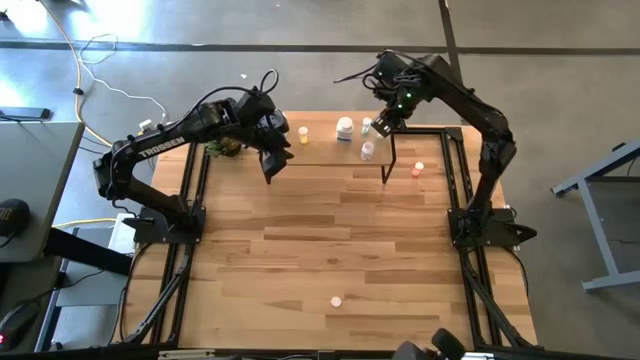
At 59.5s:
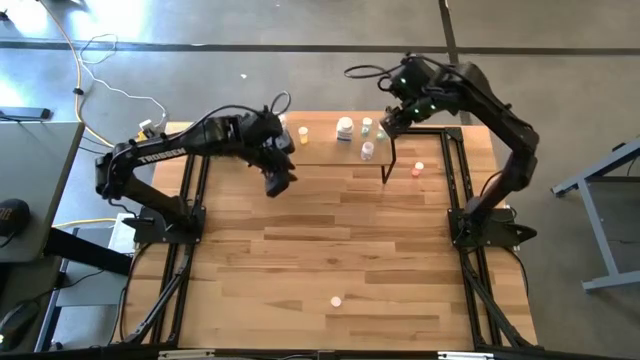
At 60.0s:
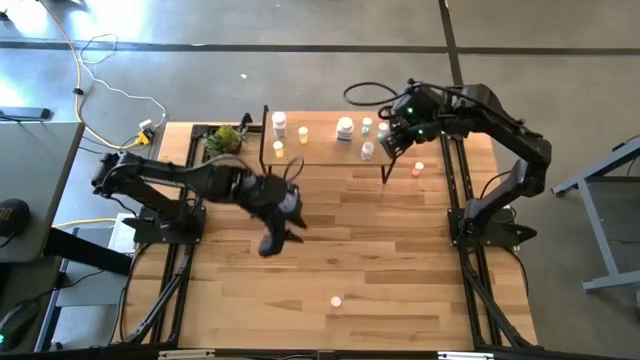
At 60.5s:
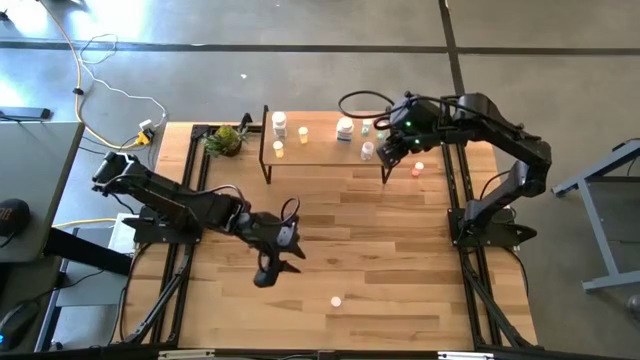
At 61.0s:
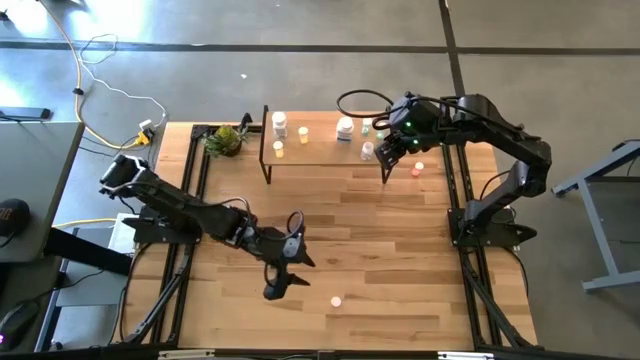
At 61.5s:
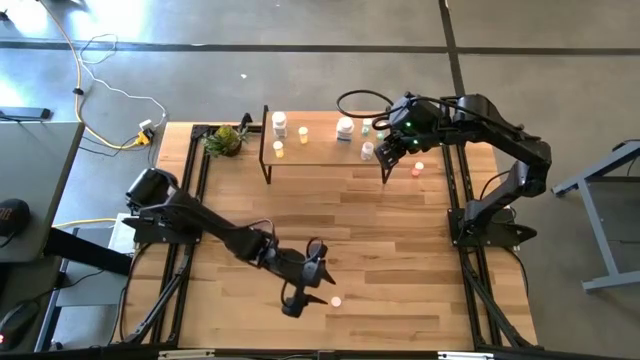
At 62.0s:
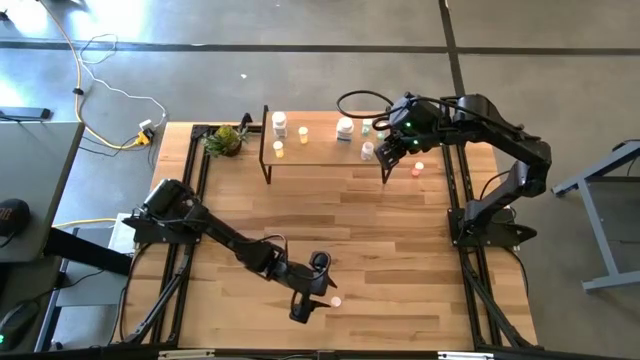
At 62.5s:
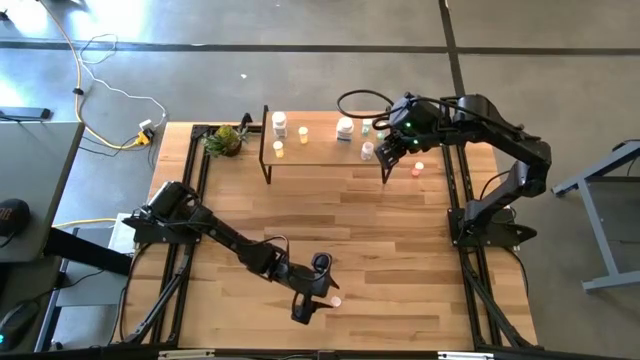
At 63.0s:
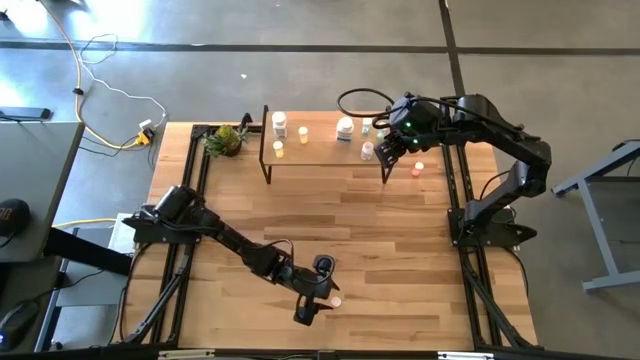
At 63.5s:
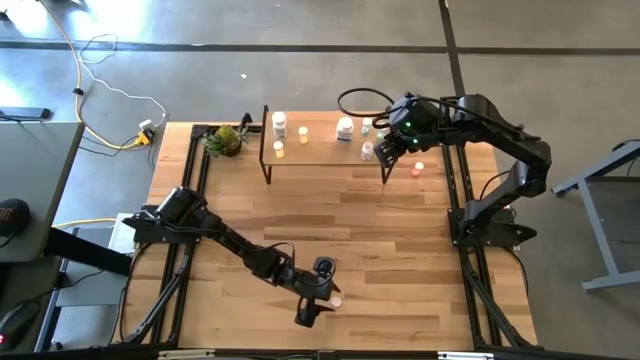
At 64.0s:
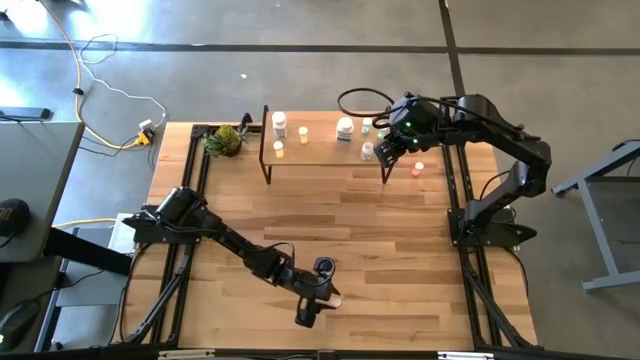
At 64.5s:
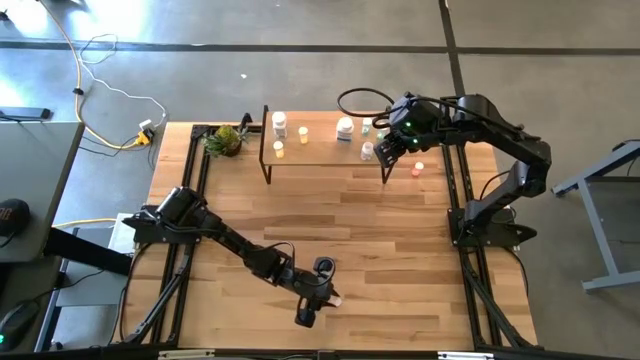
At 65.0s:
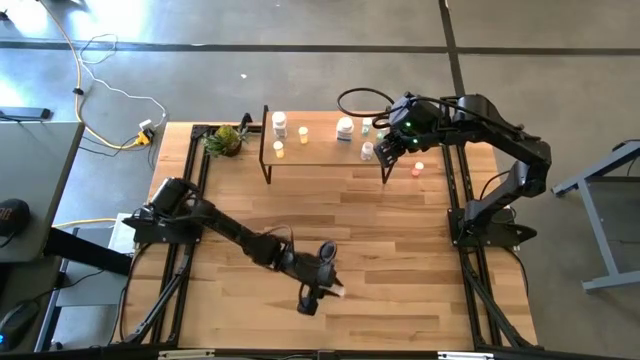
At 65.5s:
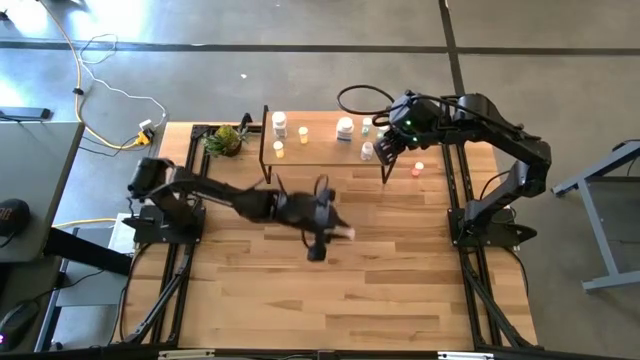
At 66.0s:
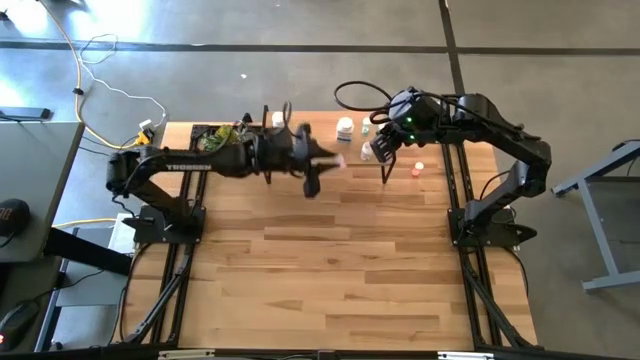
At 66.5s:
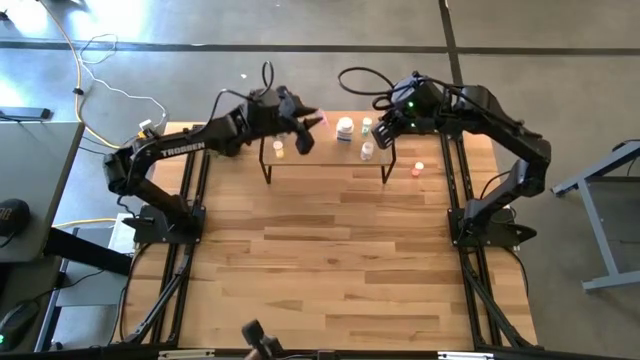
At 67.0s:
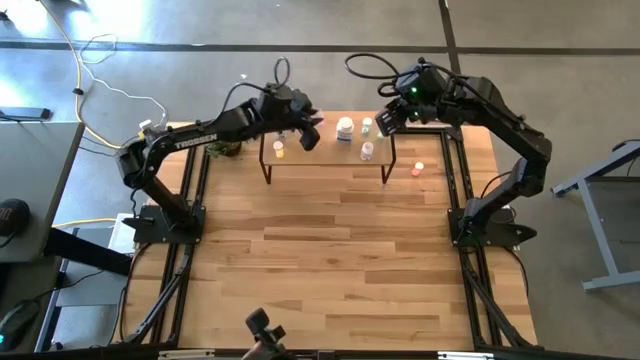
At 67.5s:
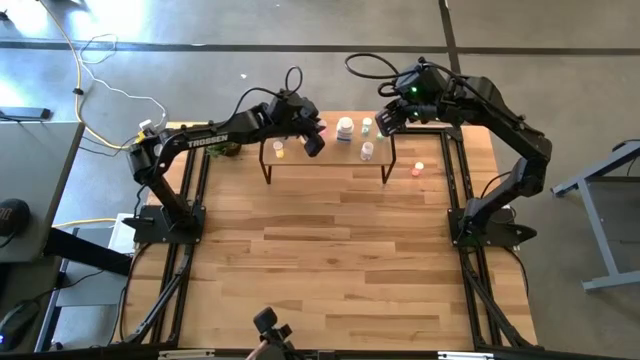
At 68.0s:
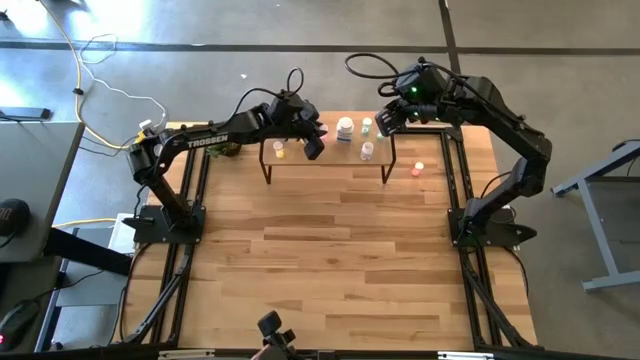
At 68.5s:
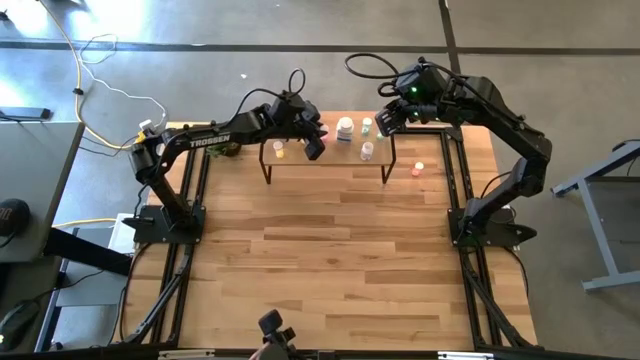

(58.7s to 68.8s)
Task: Pick and place medicine bottles onto shelf by color
Put the bottom pink pill bottle on the shelf

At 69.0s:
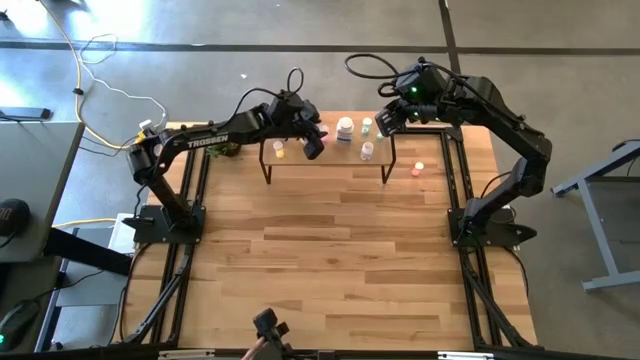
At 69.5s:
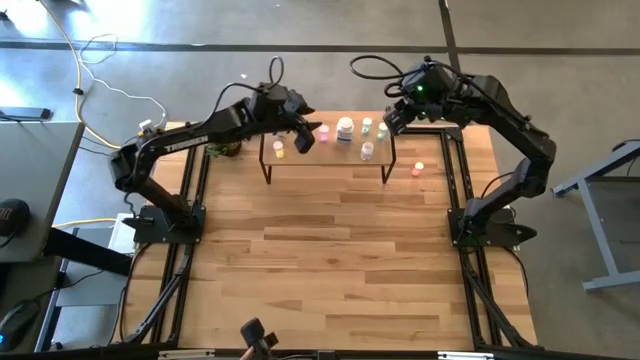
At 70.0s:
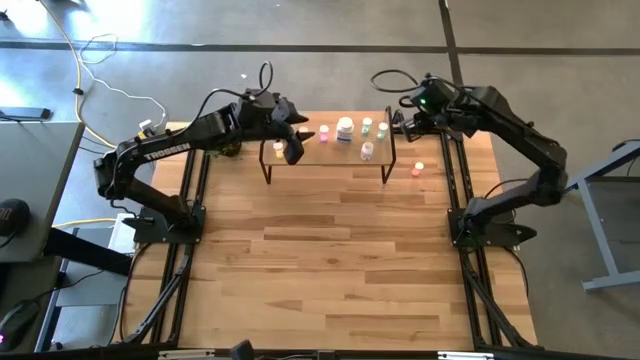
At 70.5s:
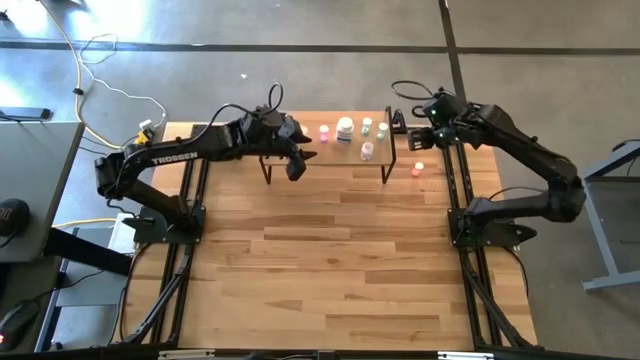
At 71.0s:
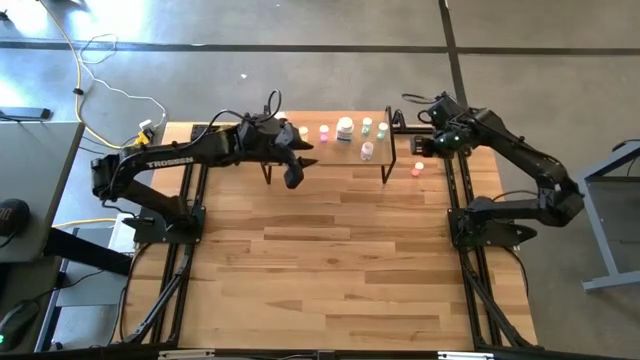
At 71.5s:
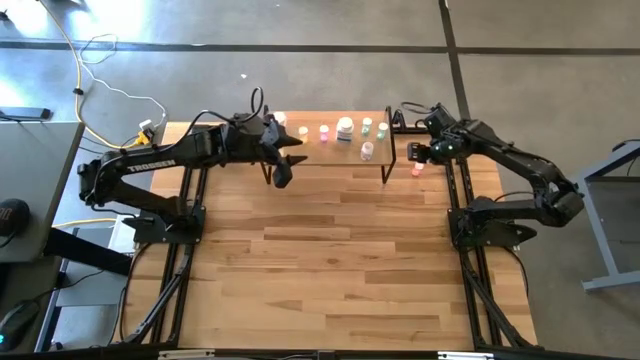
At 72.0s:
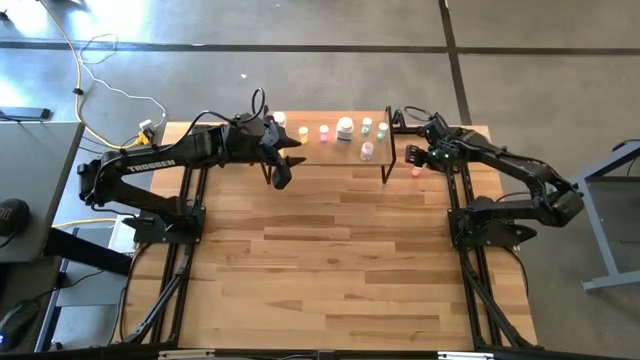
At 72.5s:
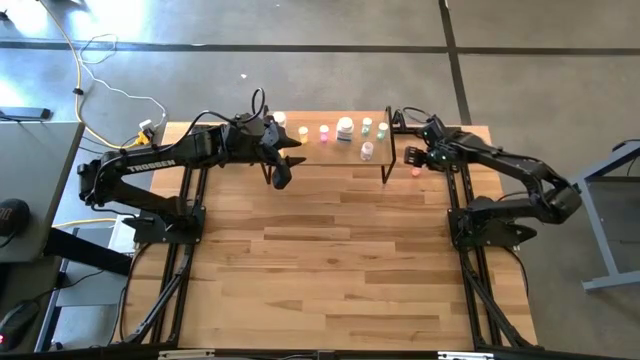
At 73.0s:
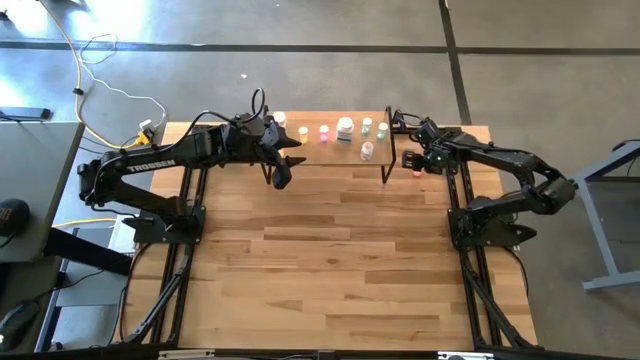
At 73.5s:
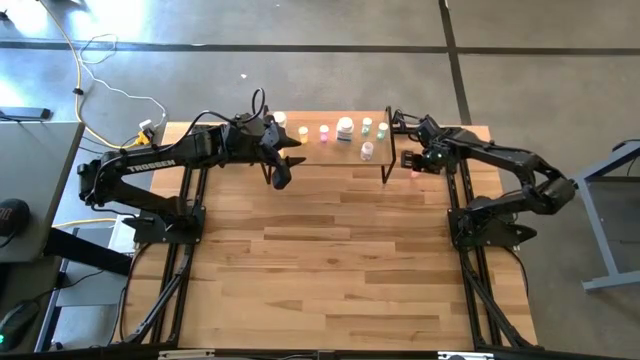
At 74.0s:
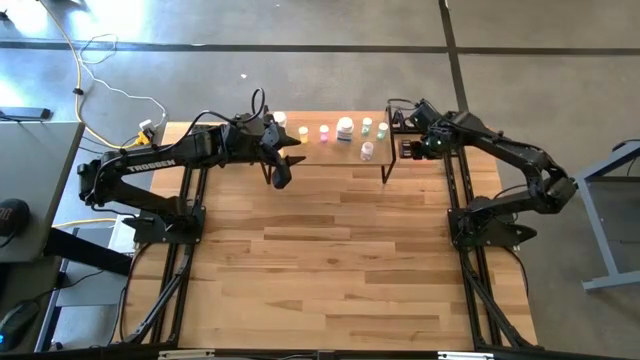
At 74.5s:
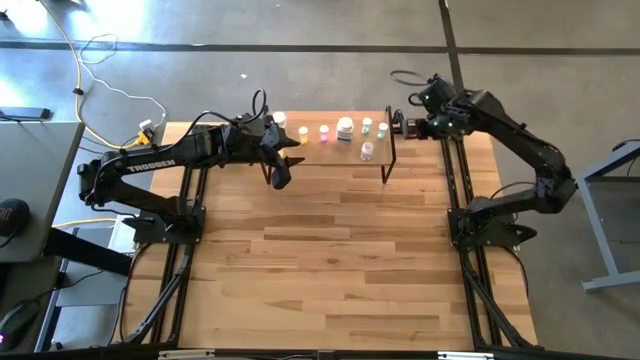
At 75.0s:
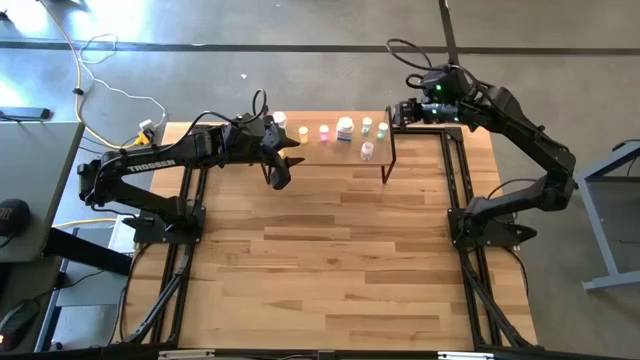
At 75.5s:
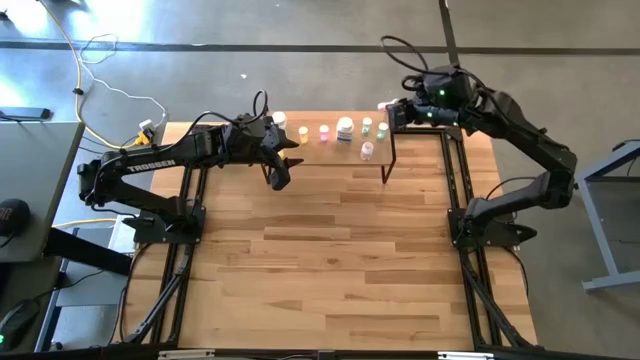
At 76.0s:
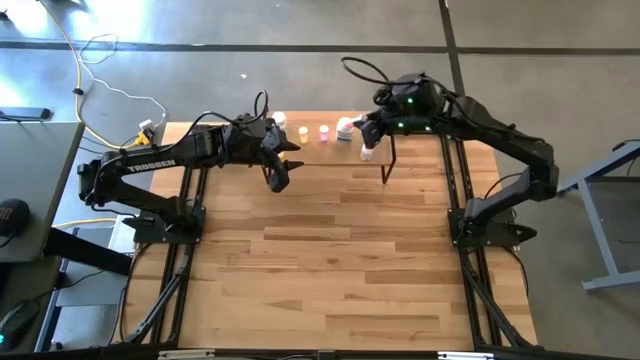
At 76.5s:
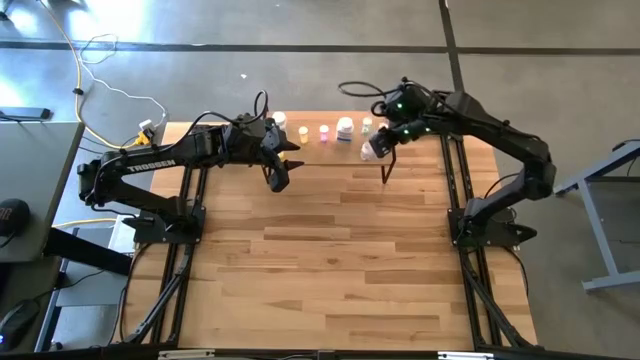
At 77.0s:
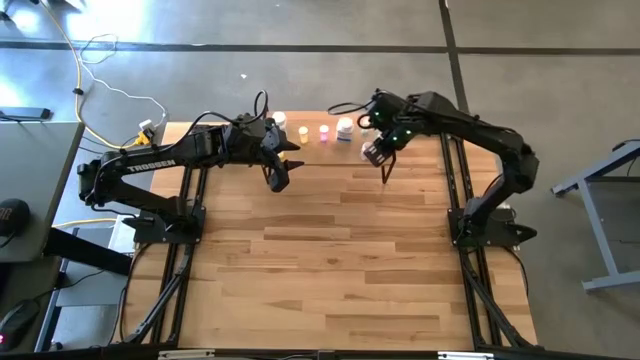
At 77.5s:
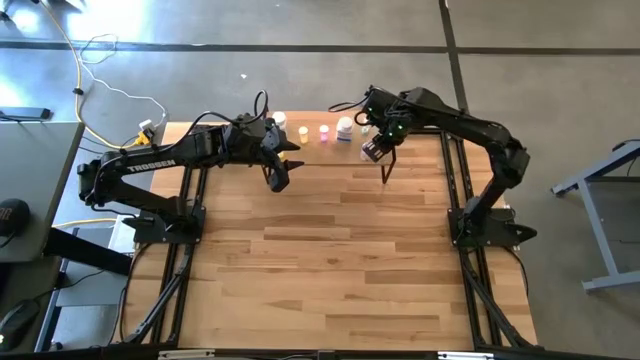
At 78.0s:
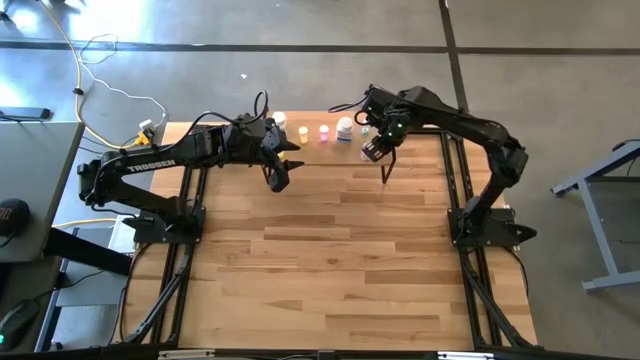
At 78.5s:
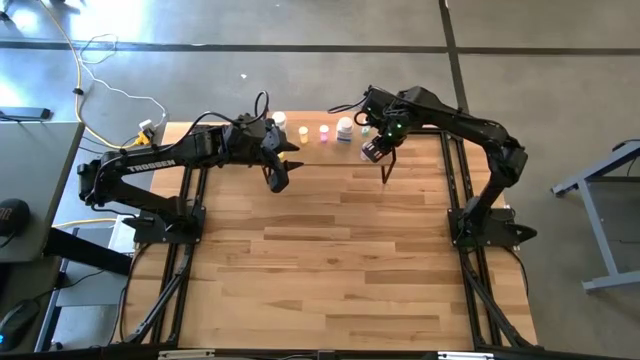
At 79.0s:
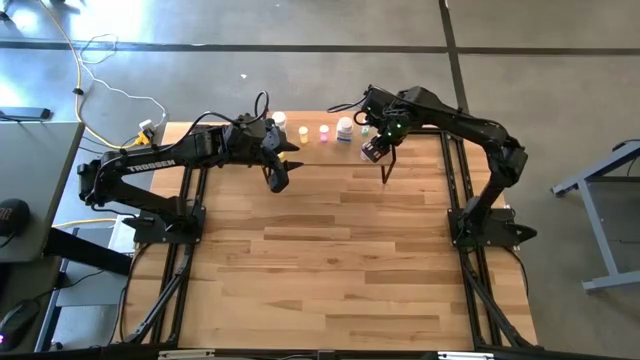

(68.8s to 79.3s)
Put the pink pill bottle on the shelf

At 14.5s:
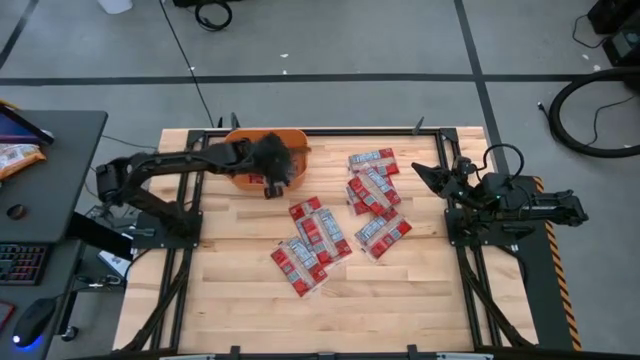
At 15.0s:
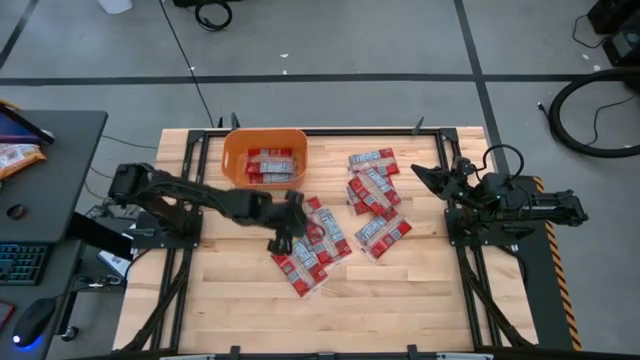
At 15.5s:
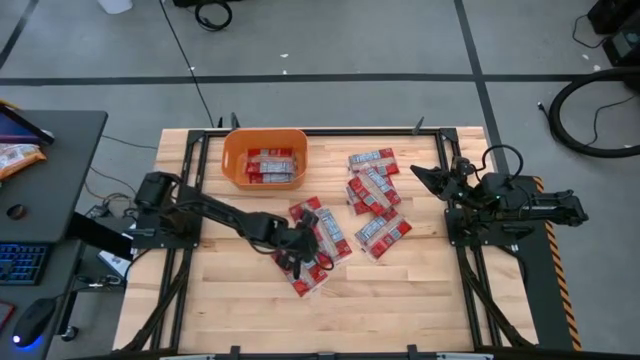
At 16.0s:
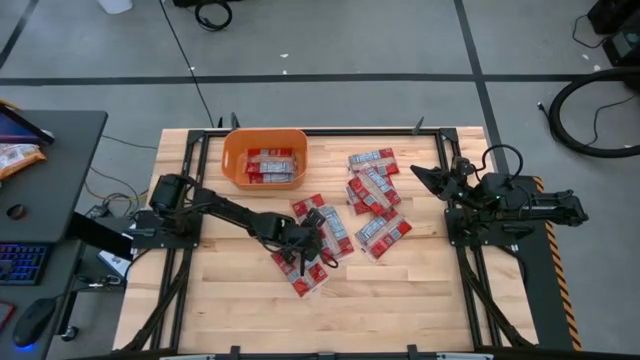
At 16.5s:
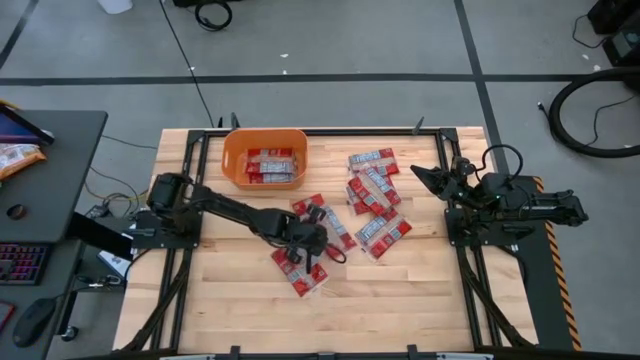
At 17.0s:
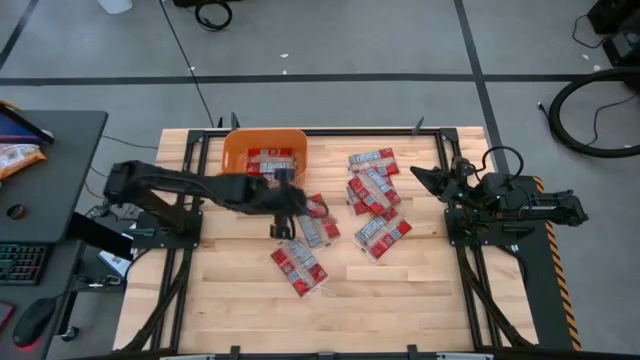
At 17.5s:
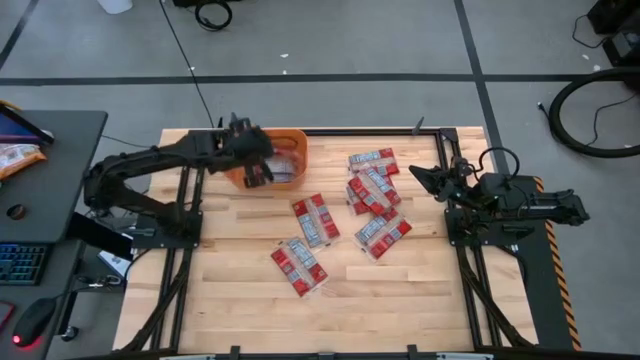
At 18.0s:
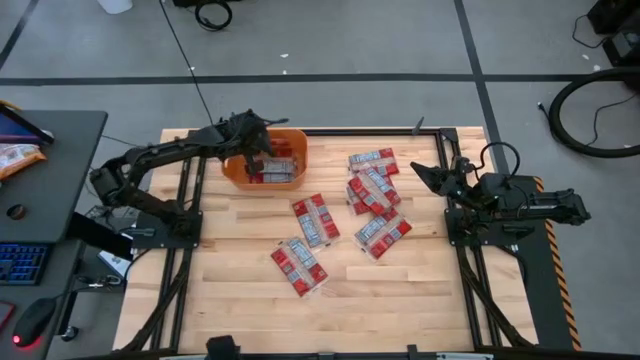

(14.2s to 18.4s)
Task: Sort popcorn bags into baskets
Put the red popcorn bag into the orange container
